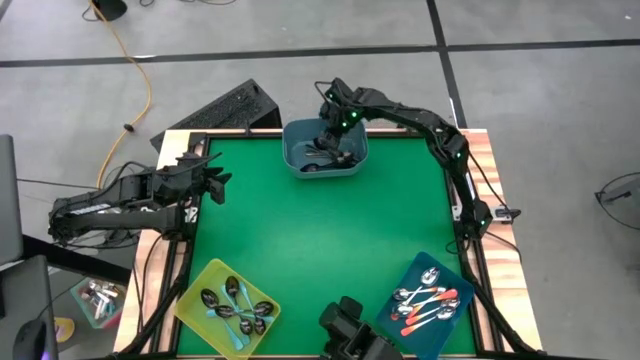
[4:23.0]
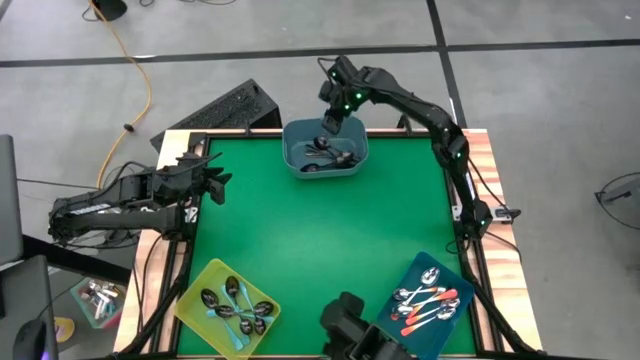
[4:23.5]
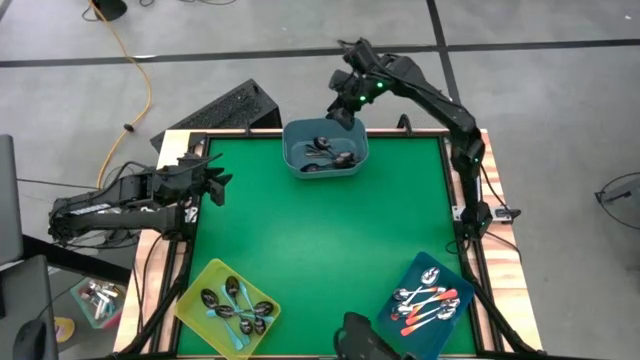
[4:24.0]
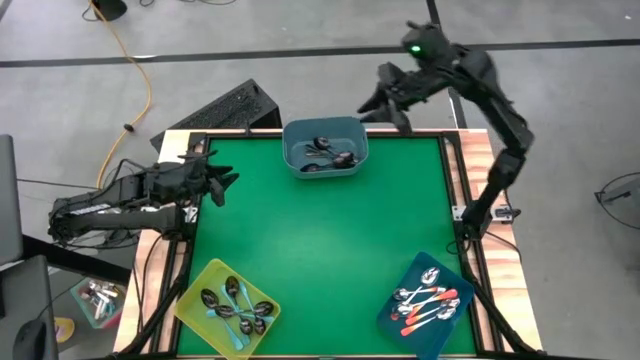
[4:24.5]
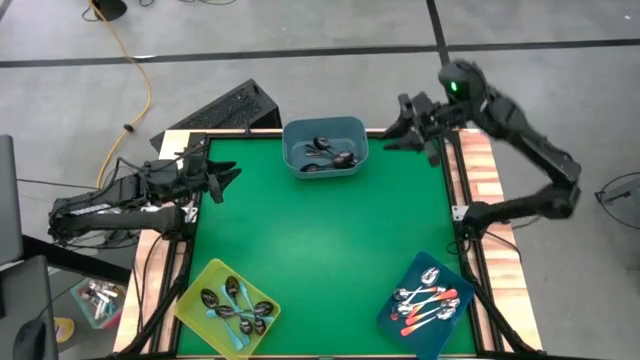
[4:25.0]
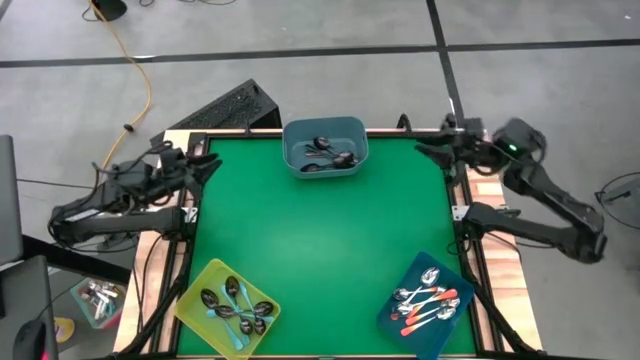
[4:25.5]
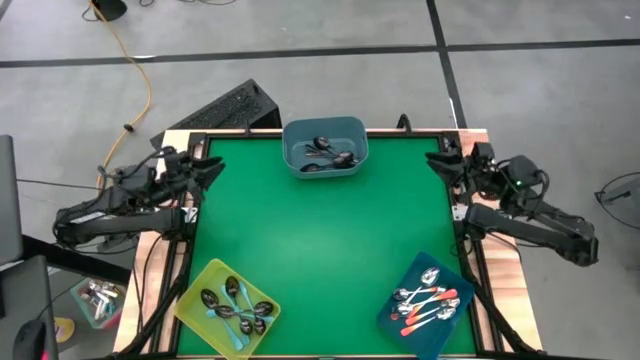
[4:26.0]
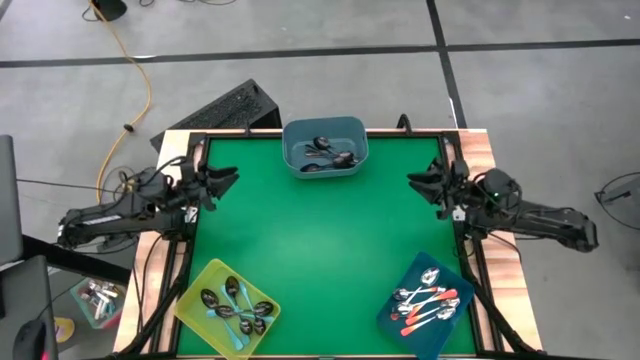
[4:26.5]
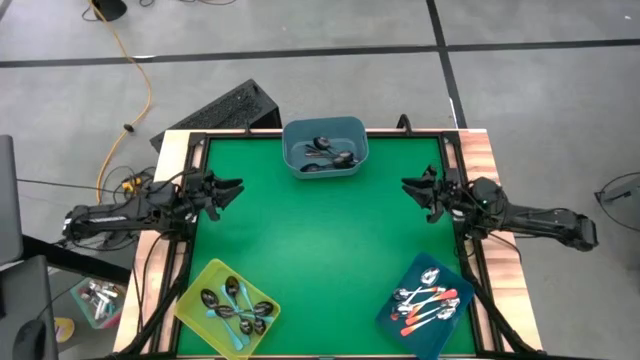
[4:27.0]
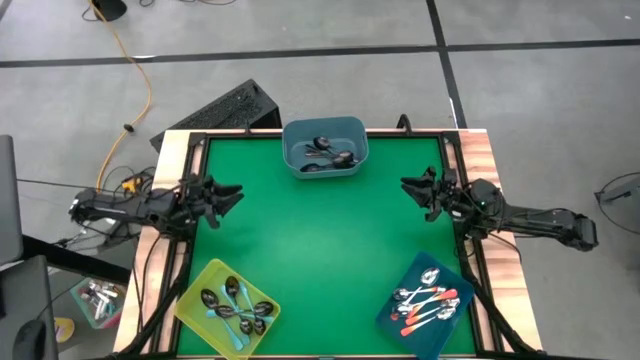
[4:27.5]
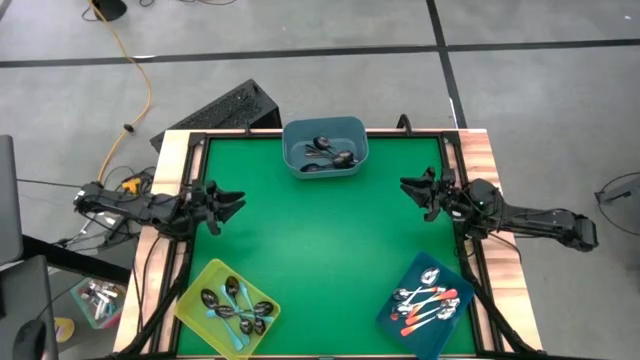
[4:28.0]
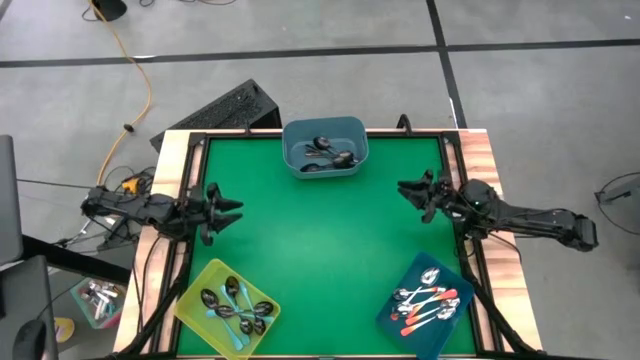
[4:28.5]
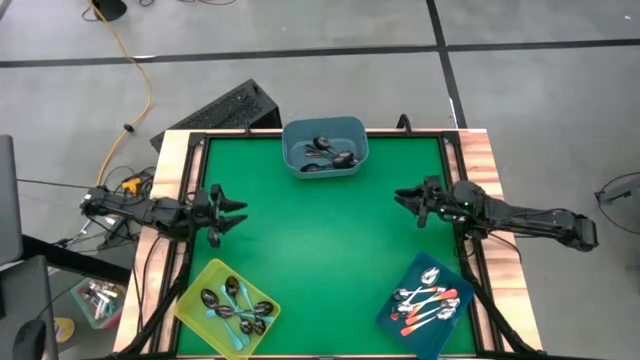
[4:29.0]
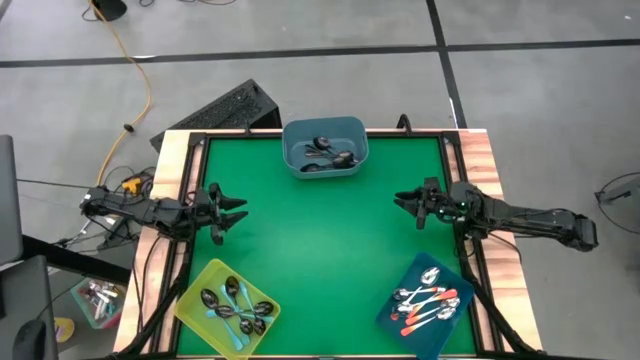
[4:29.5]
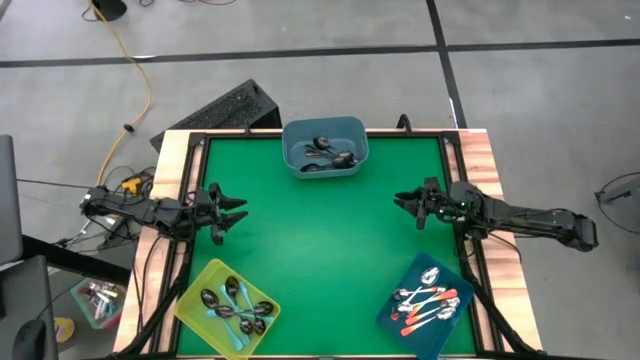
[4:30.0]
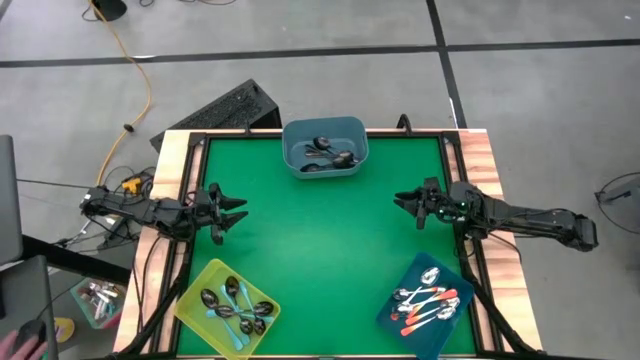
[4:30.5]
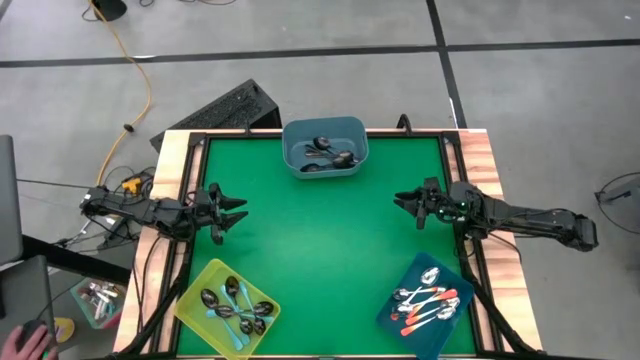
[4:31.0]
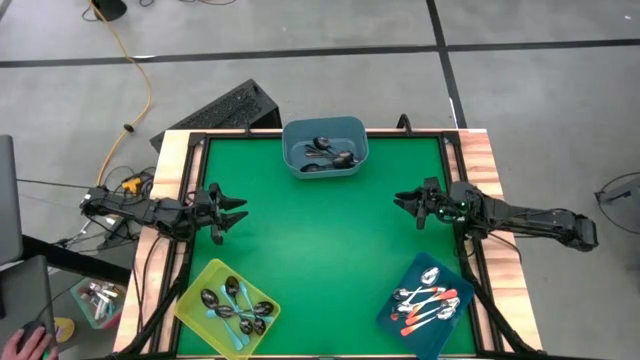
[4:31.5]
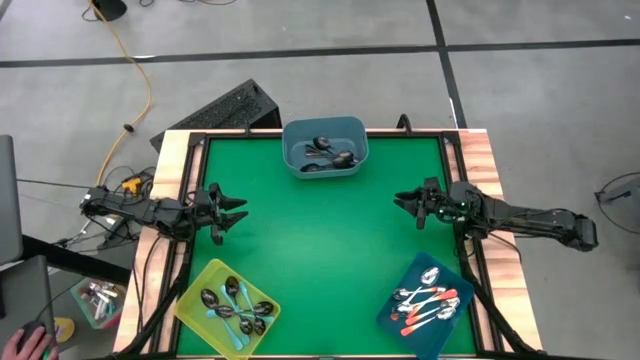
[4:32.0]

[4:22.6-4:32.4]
Task: Sort silverware by color (type)
Return to Home Position

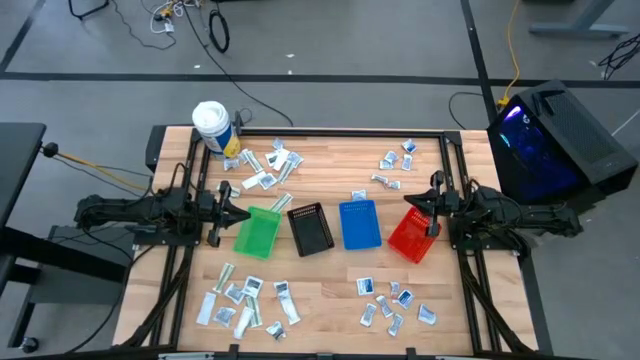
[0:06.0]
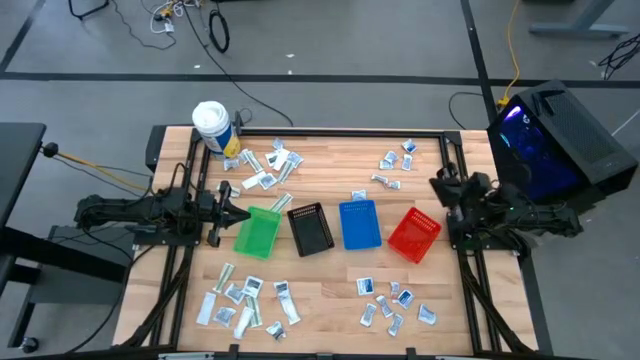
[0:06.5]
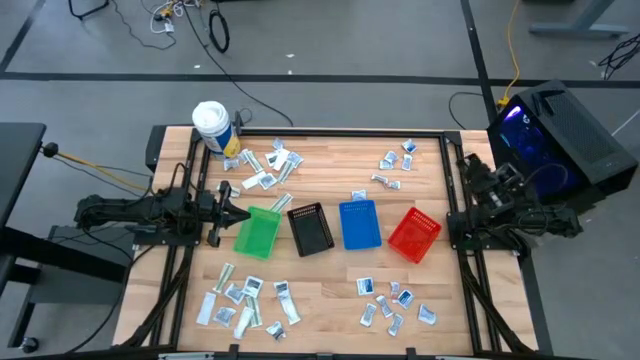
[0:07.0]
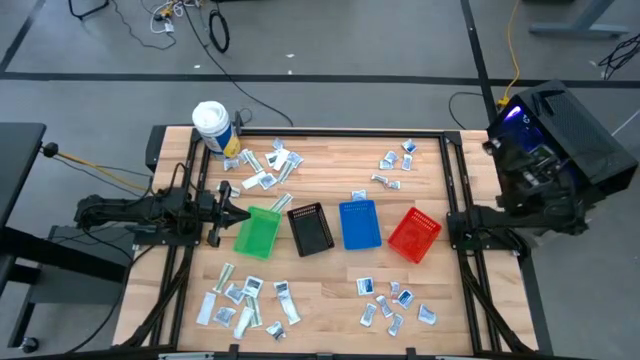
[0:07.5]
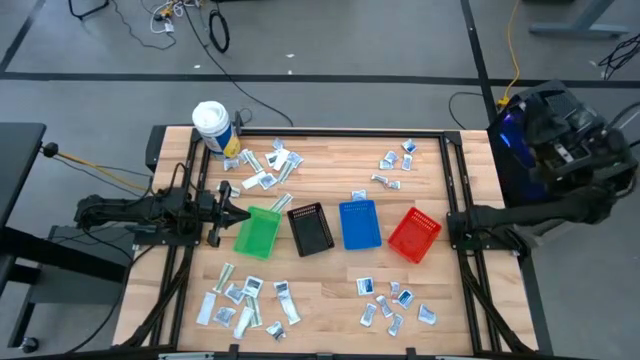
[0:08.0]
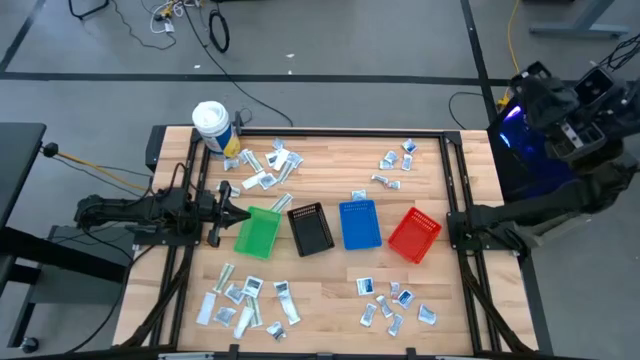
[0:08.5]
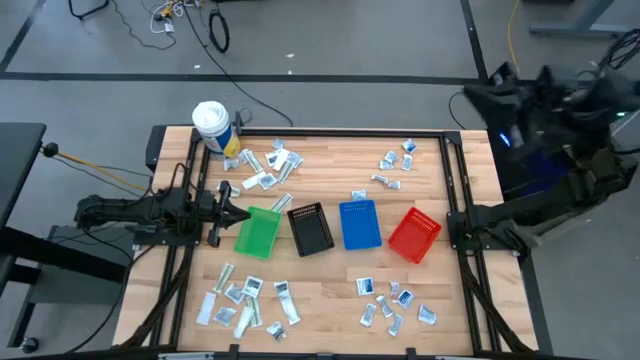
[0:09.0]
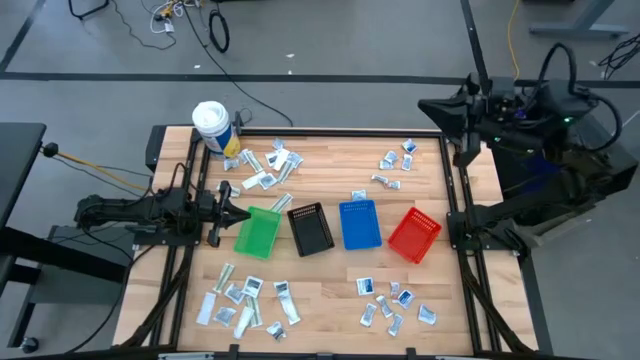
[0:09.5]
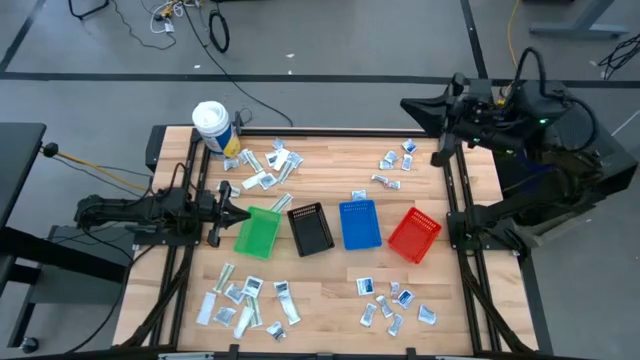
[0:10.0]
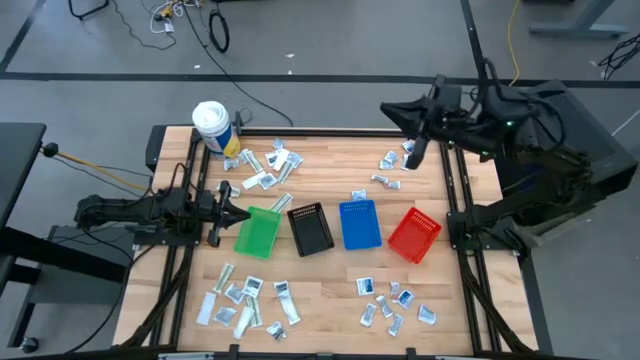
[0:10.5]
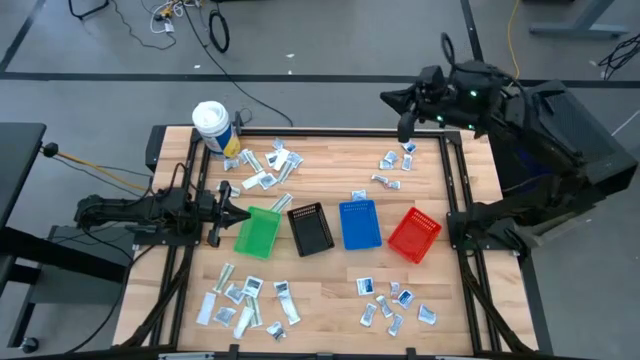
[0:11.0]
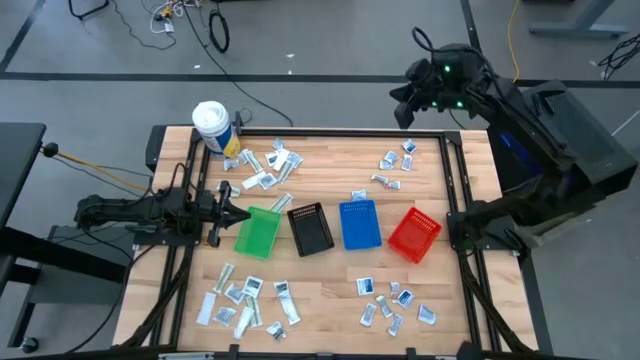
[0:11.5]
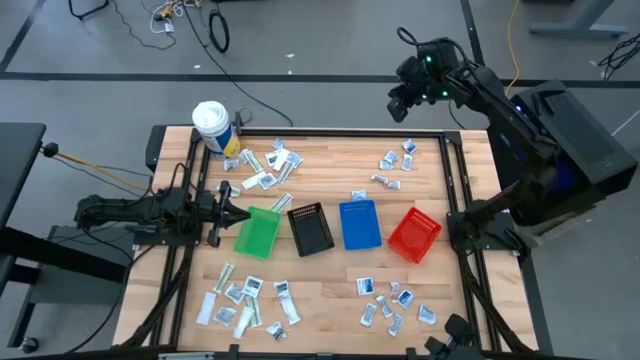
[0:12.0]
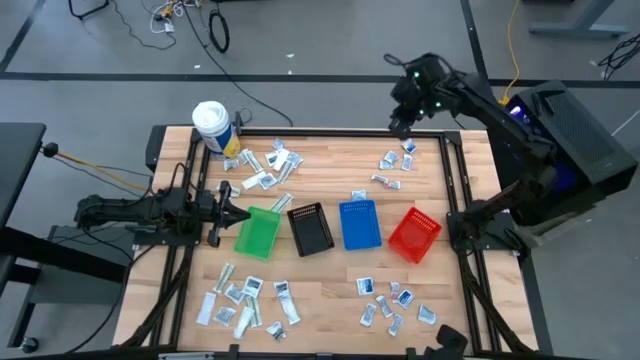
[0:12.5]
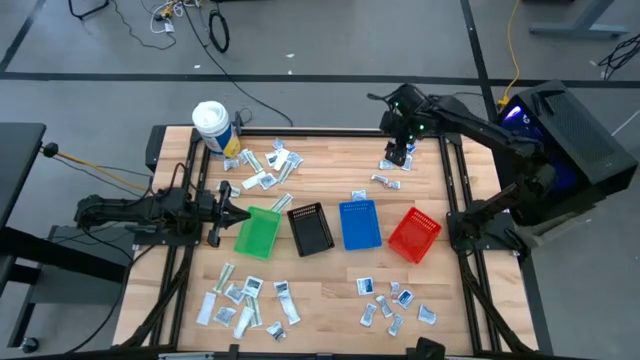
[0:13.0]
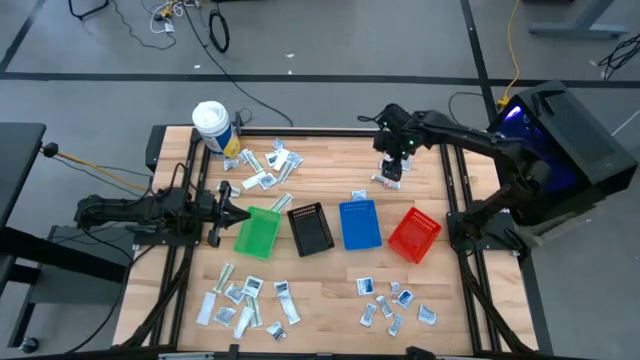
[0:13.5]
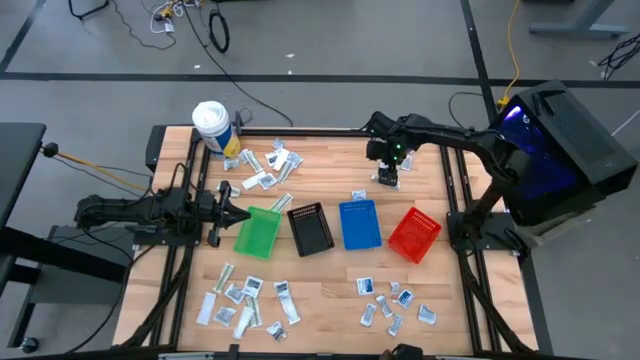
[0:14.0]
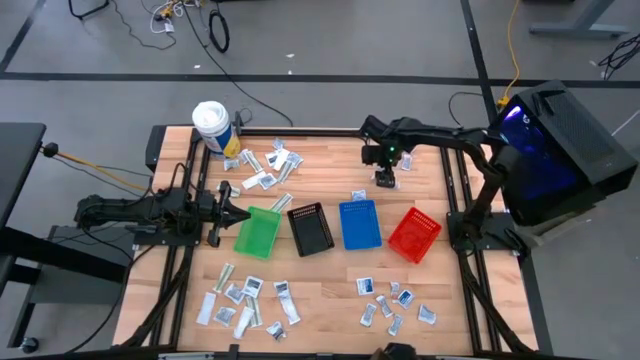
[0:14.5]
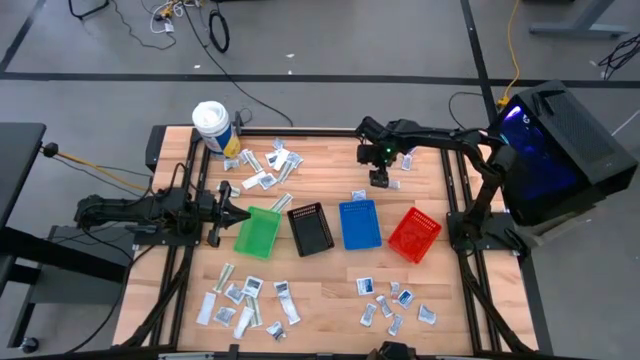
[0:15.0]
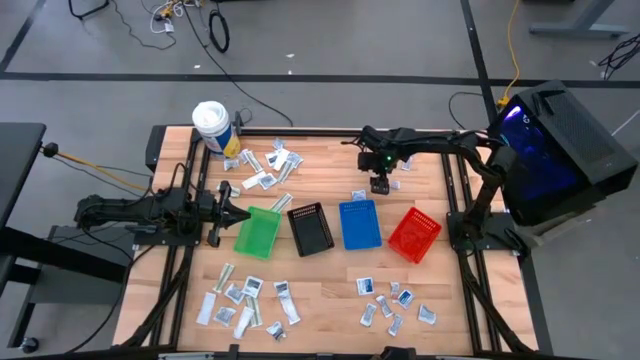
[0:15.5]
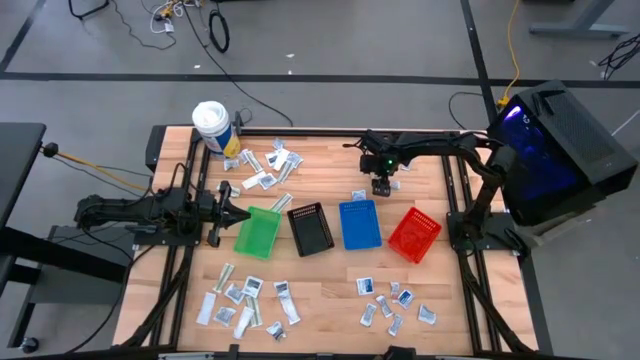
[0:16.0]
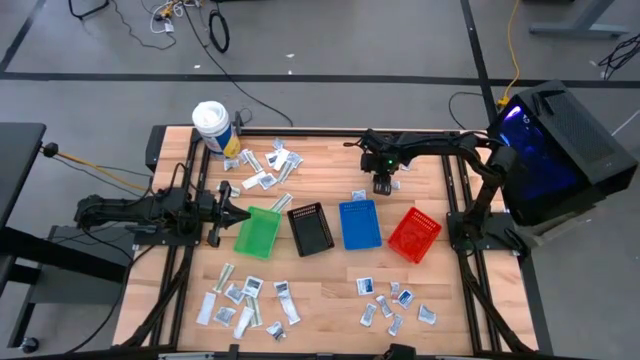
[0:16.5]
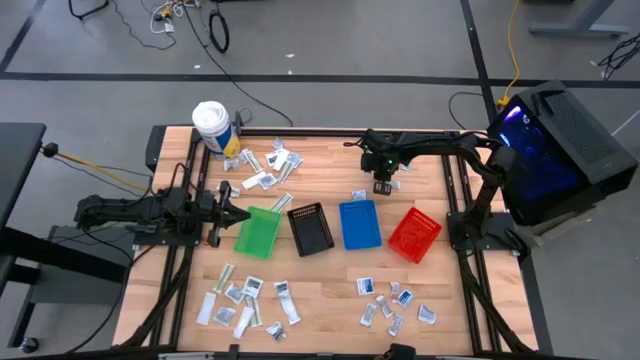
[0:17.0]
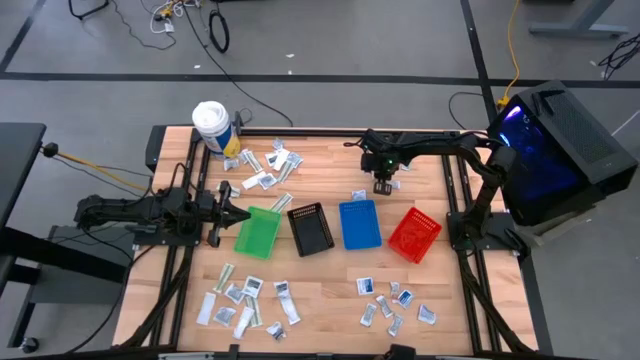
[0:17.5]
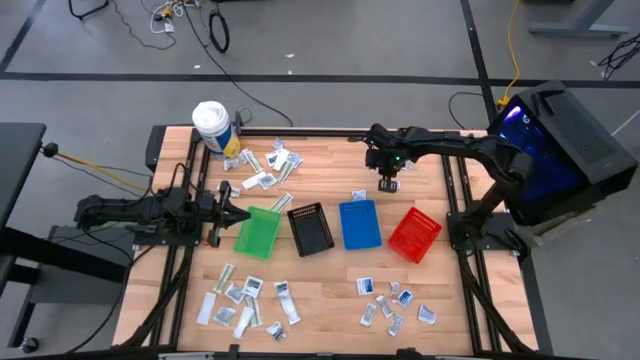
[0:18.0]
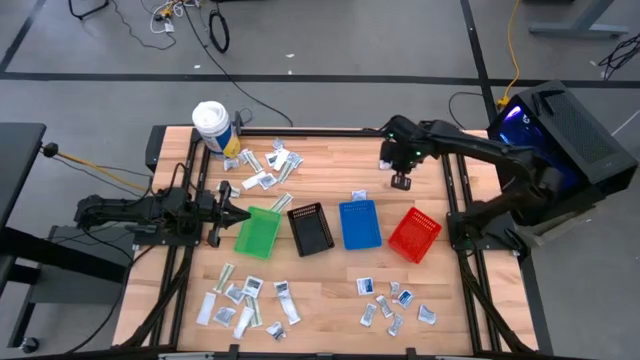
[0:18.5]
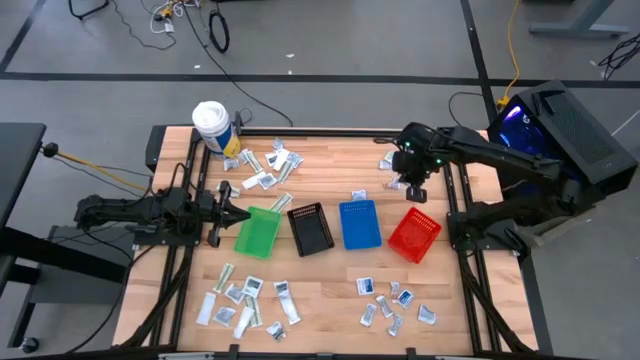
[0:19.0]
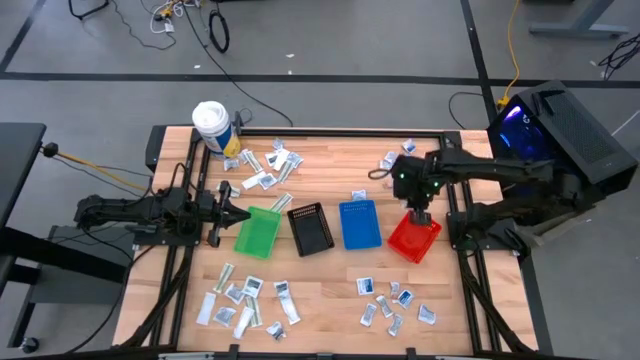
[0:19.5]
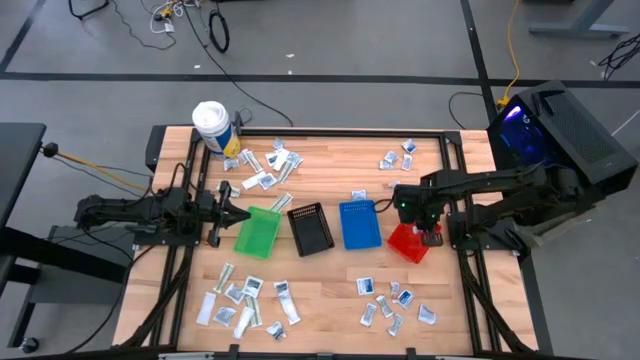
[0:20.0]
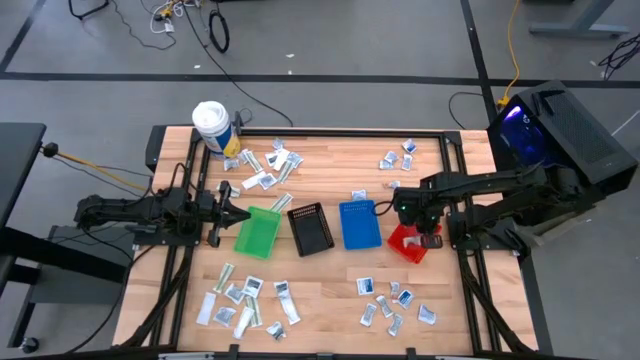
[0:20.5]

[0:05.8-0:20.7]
Task: Pick & Place First Aid Supplies
Put the ointment pack into the red basket
